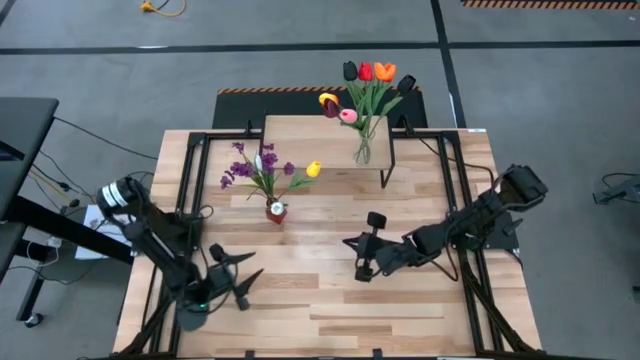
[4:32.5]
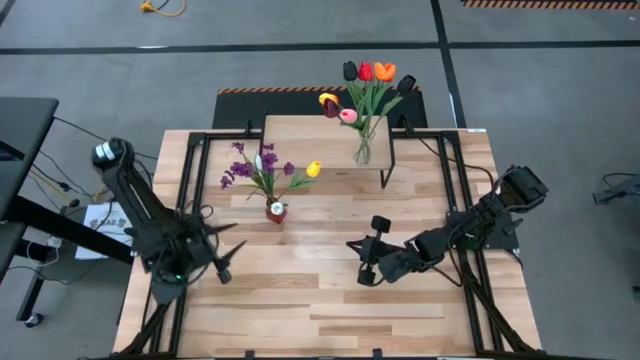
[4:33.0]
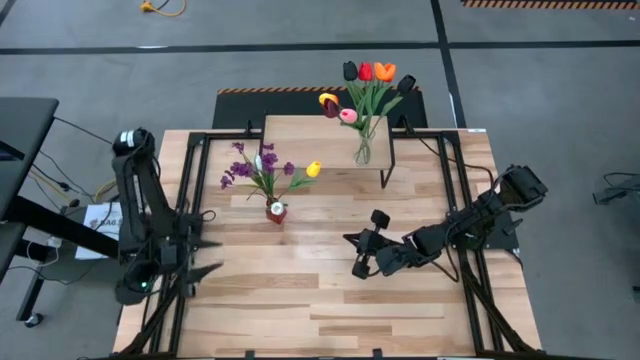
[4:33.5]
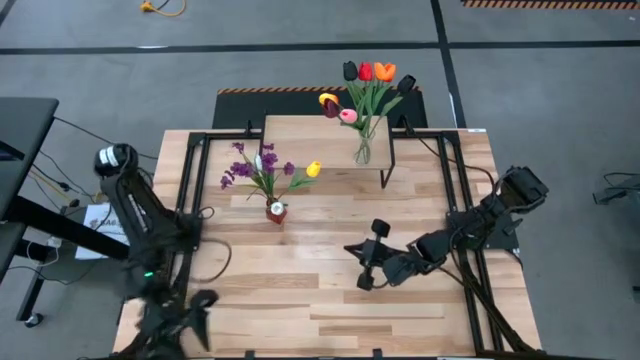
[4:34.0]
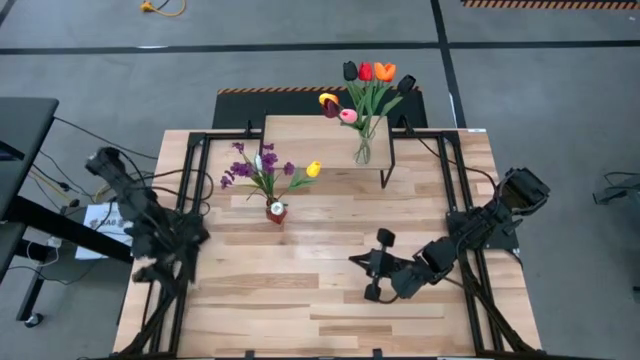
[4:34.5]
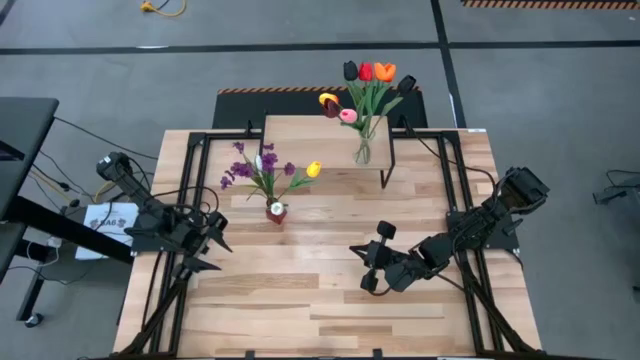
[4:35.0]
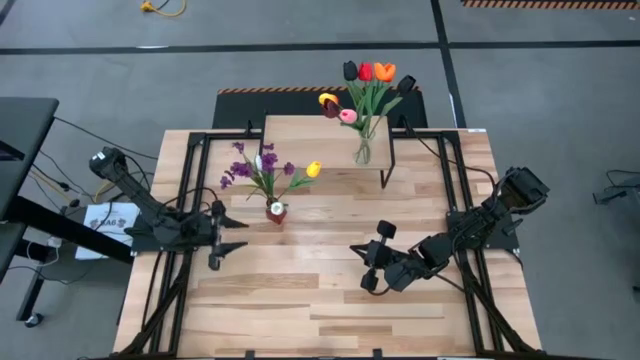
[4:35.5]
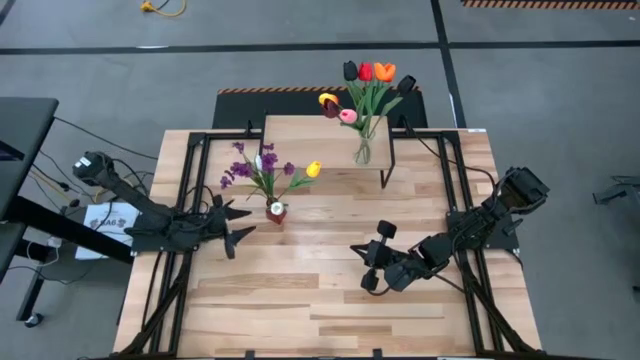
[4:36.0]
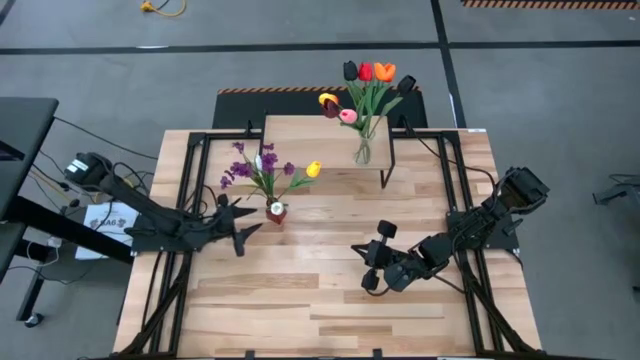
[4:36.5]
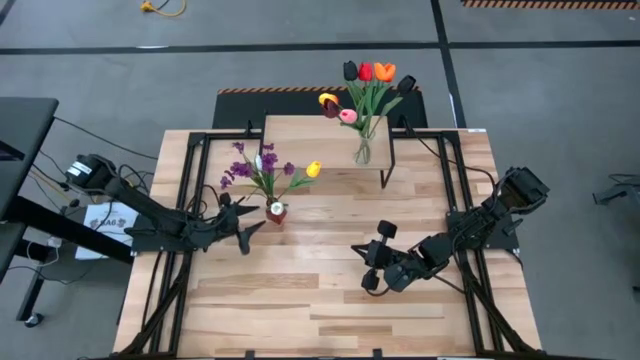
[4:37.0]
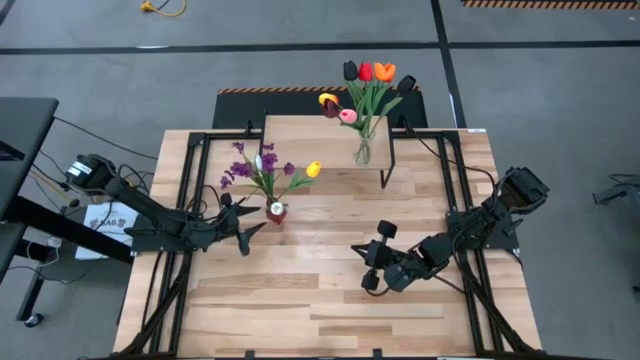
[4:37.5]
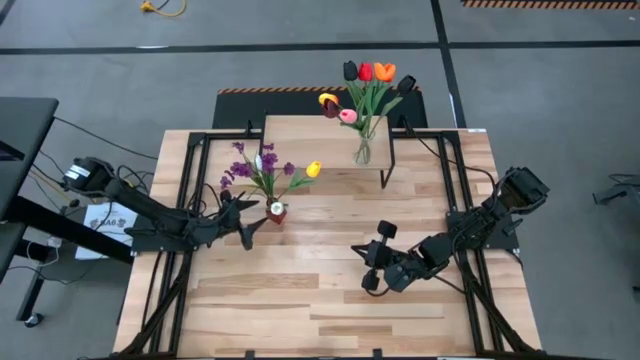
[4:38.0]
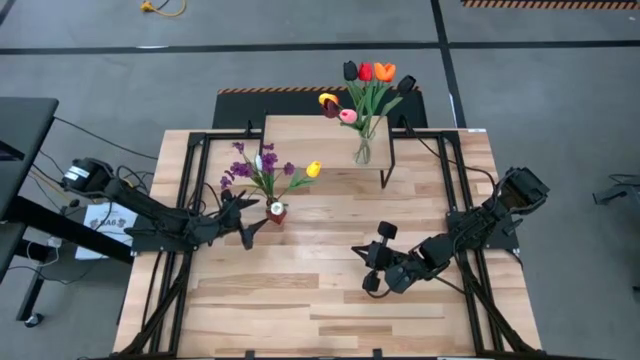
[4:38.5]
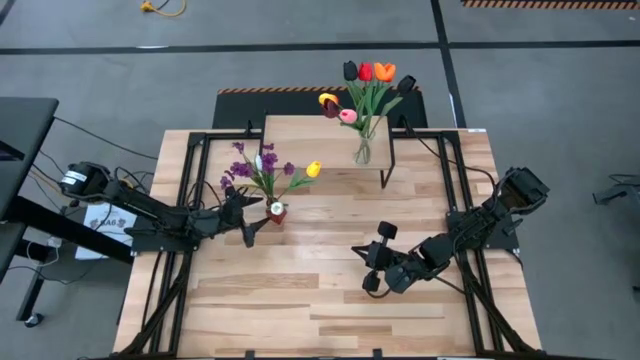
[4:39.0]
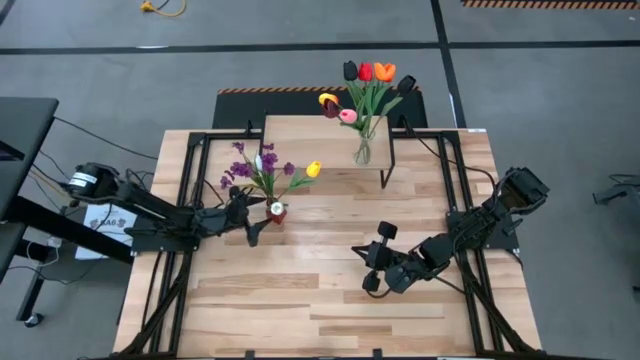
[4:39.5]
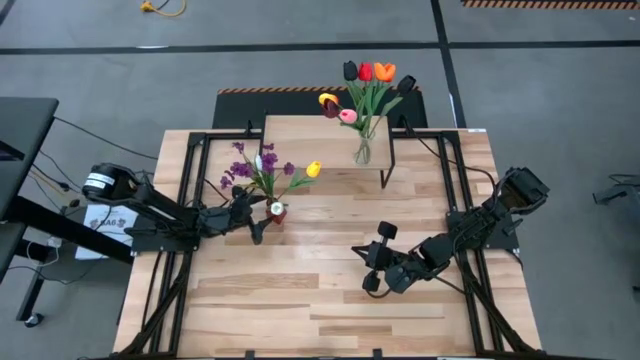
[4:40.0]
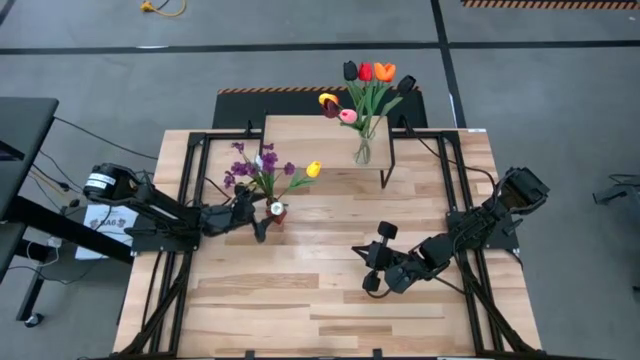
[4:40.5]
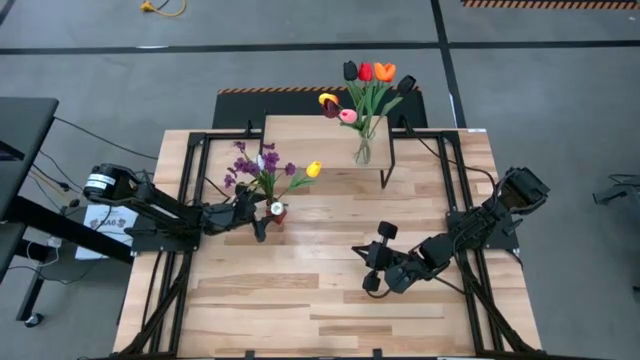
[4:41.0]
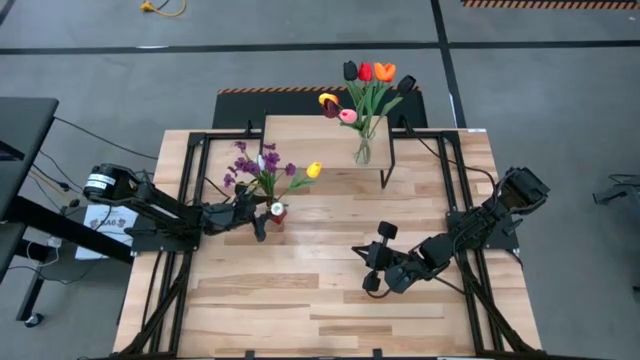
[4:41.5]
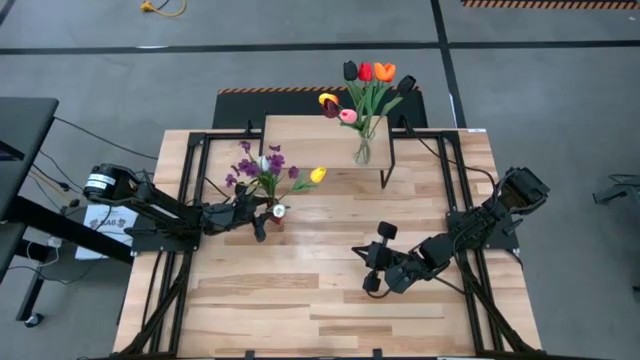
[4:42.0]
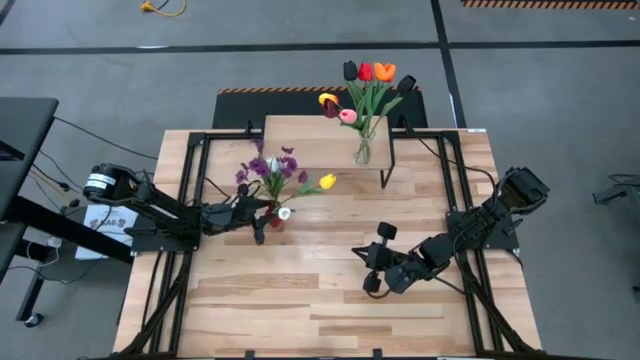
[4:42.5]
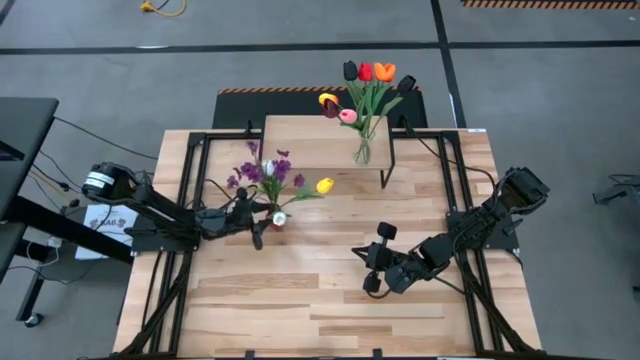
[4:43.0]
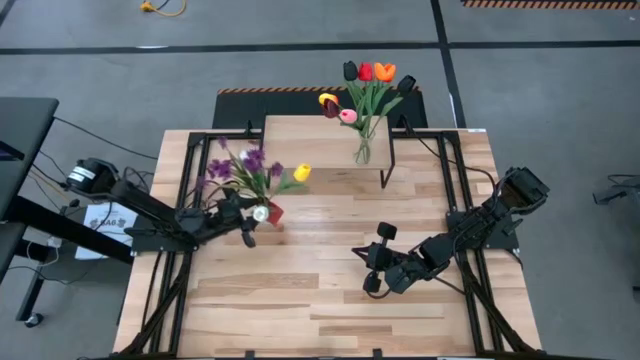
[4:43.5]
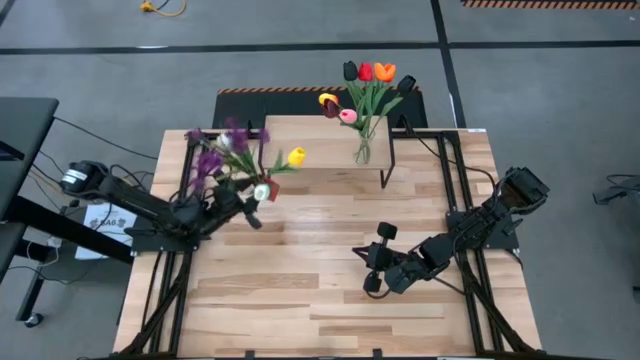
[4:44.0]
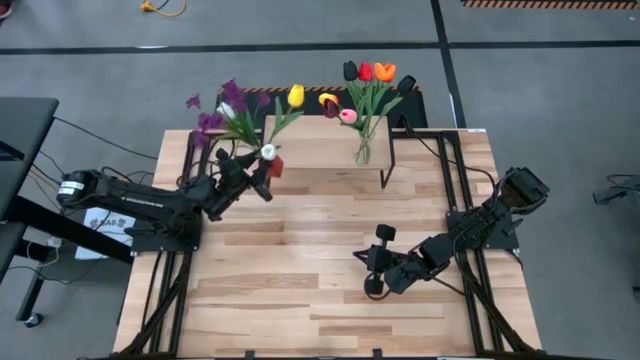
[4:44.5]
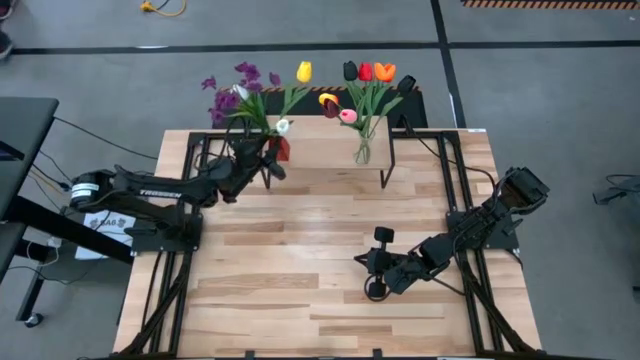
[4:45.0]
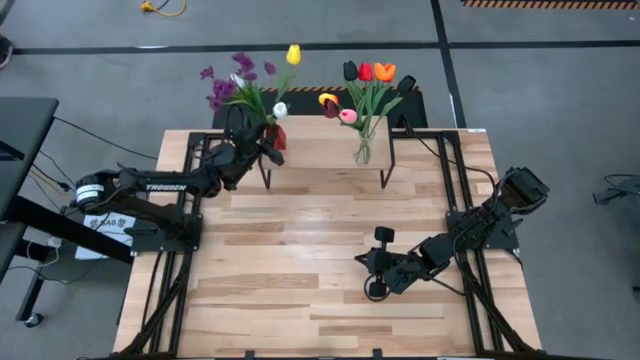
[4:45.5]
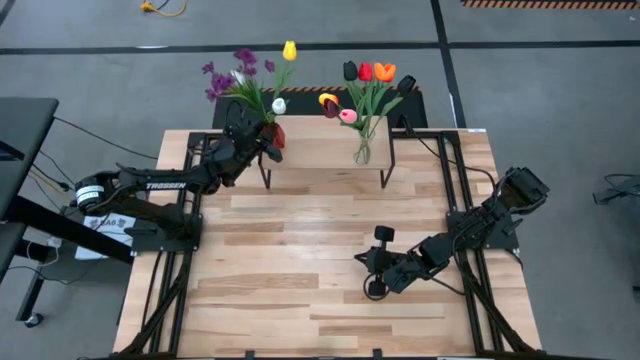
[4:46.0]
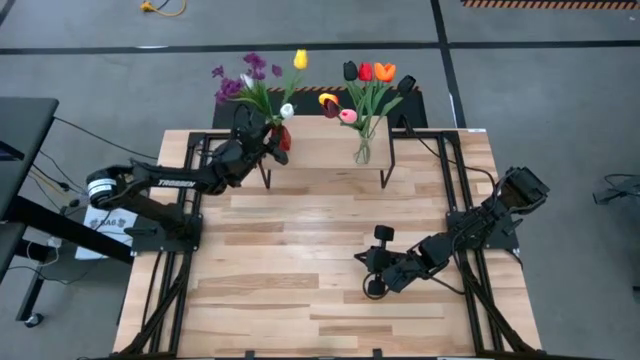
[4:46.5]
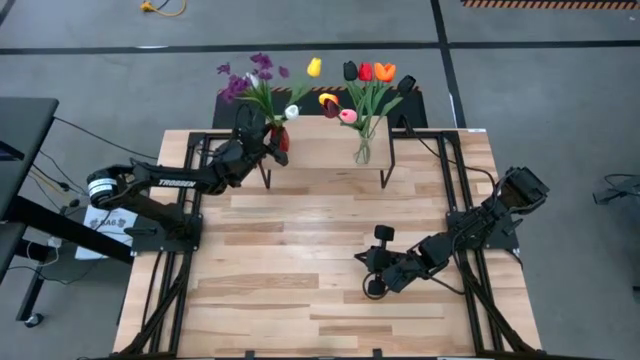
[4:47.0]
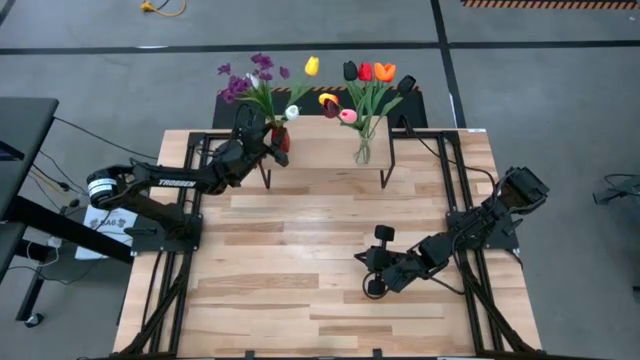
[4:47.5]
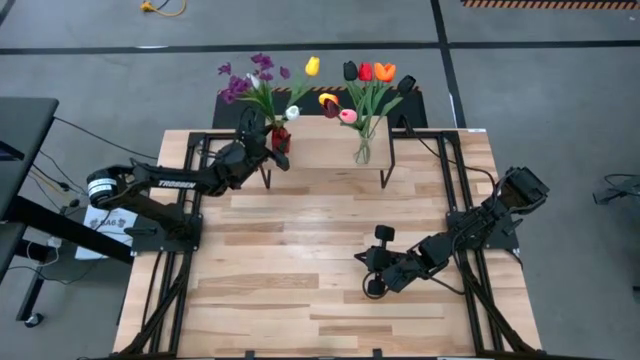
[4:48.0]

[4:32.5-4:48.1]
Task: Pick and place flowers into a vace then onto a shelf
Put the red vase with flowers on the shelf

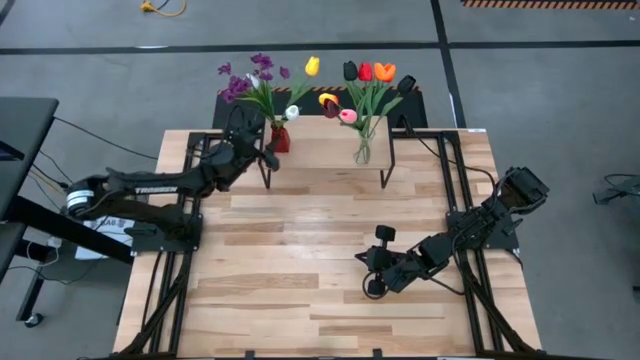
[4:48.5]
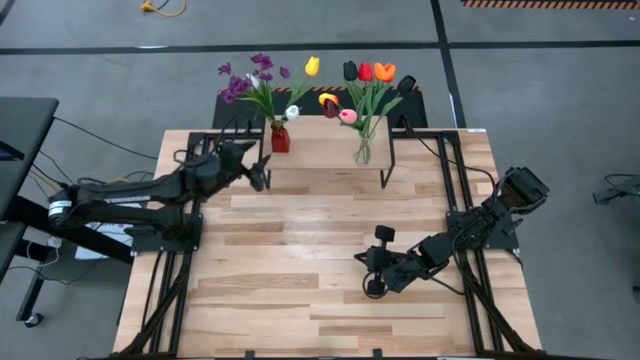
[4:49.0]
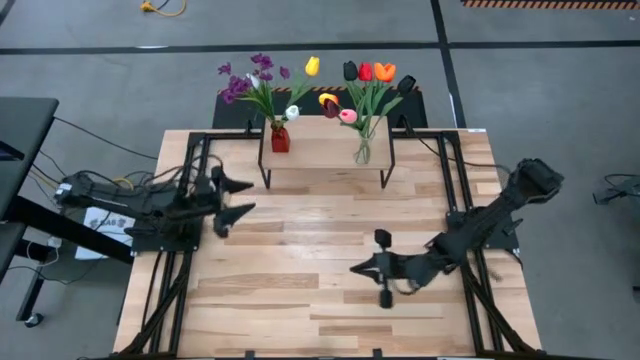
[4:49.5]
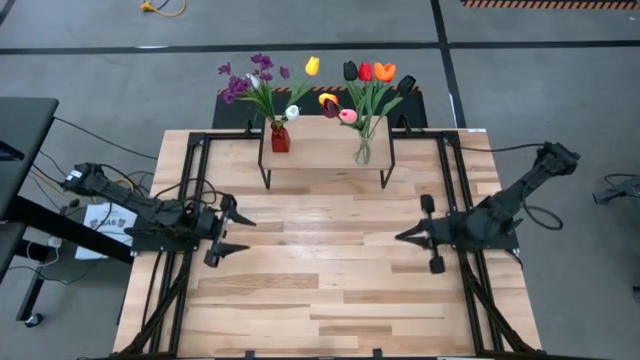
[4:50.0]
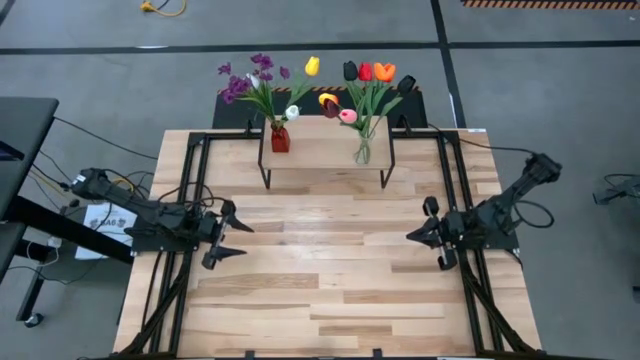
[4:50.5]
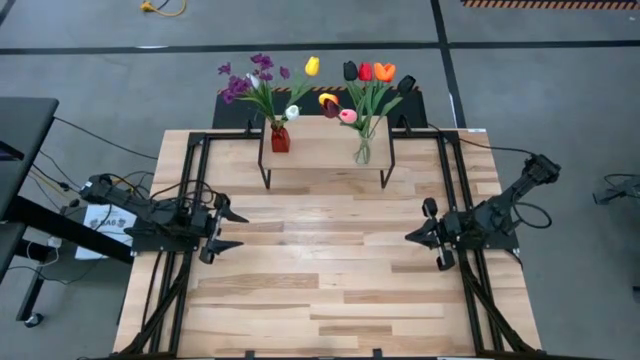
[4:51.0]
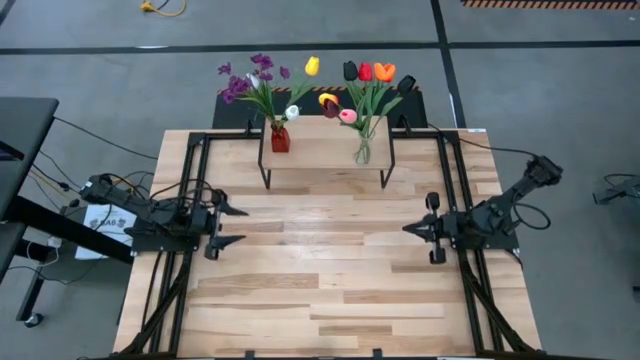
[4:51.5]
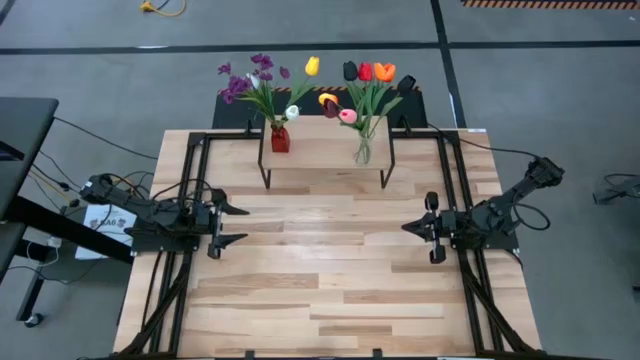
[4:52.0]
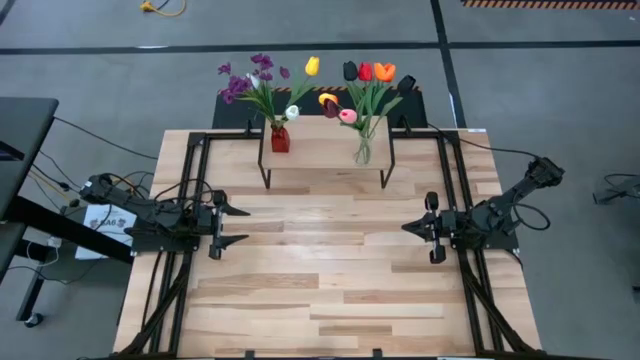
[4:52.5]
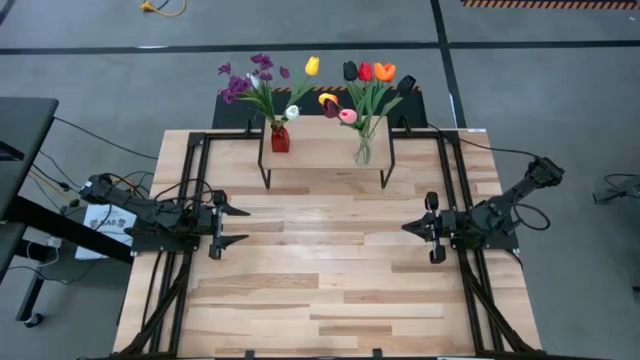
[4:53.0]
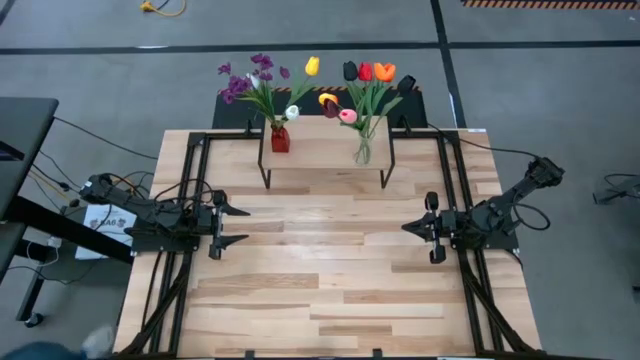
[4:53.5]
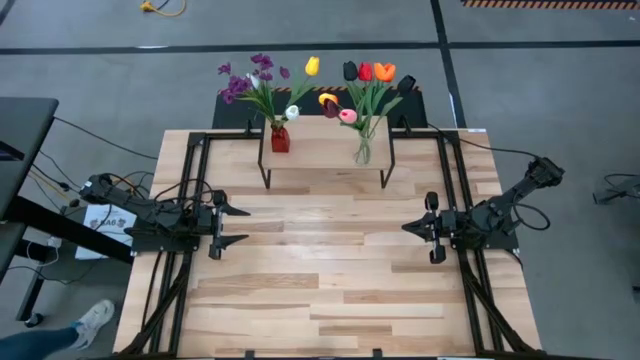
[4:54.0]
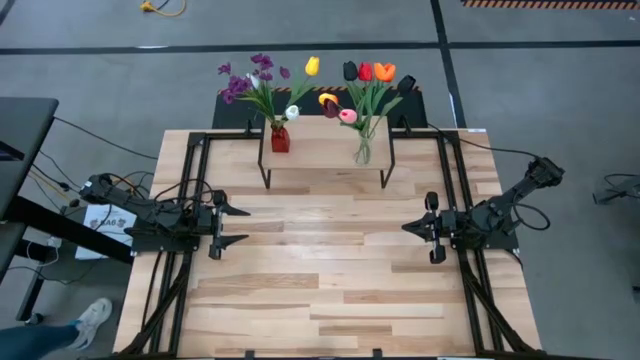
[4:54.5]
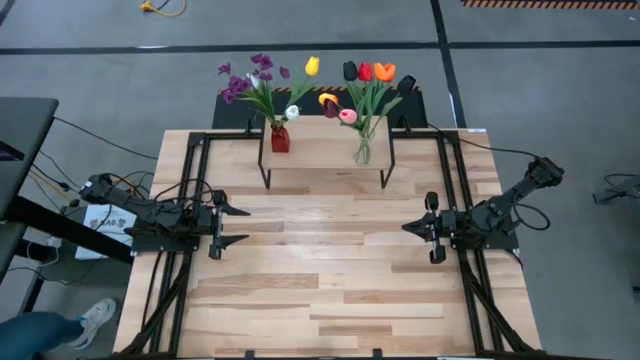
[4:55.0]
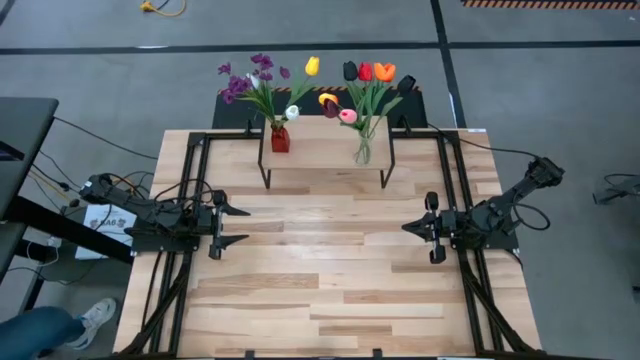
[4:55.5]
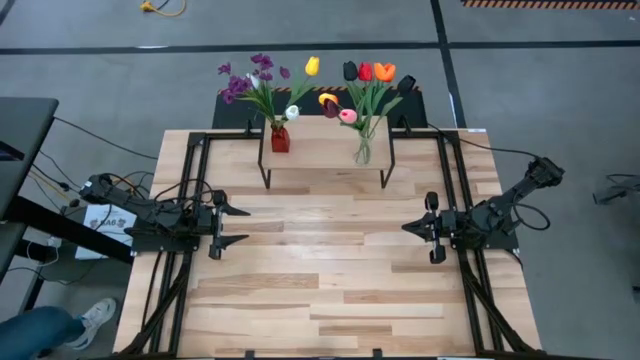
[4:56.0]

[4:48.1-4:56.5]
Return to Home Position
